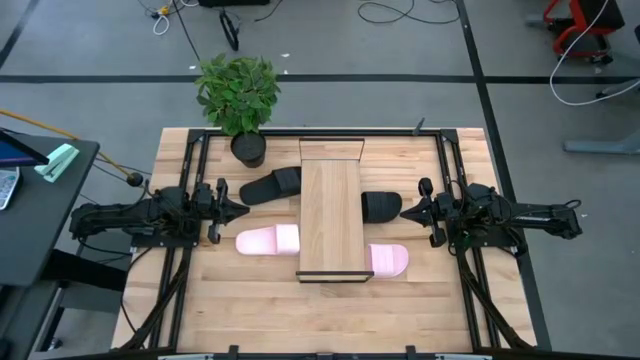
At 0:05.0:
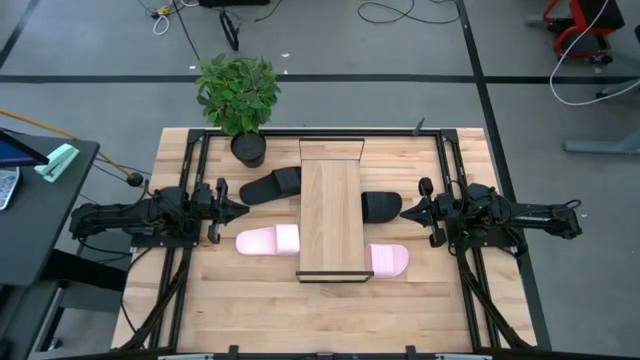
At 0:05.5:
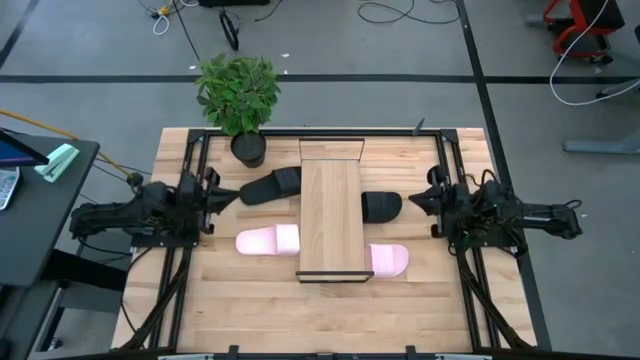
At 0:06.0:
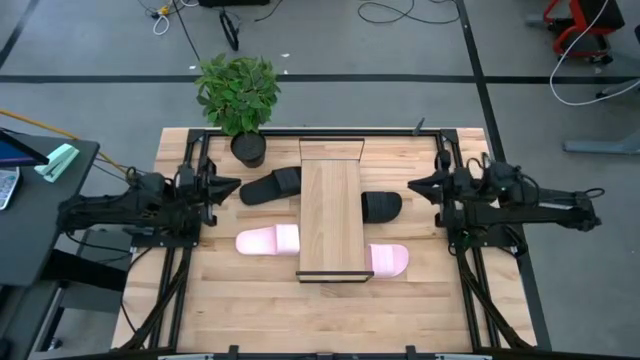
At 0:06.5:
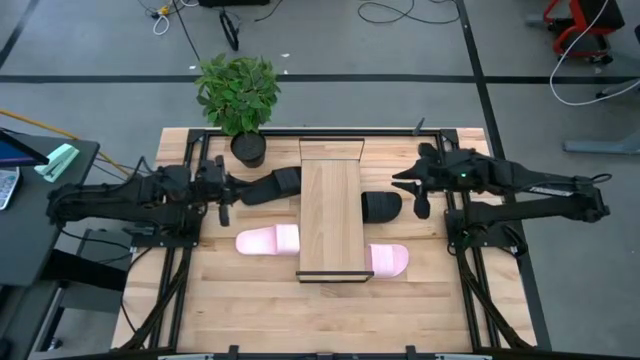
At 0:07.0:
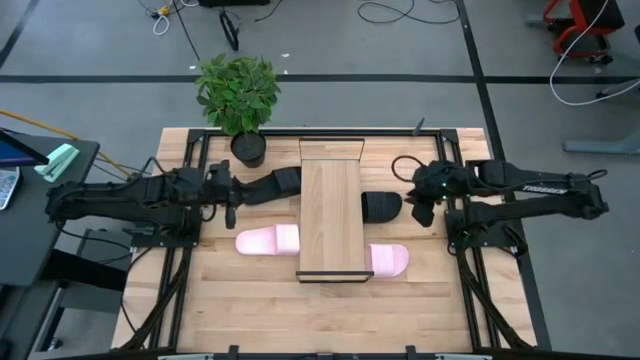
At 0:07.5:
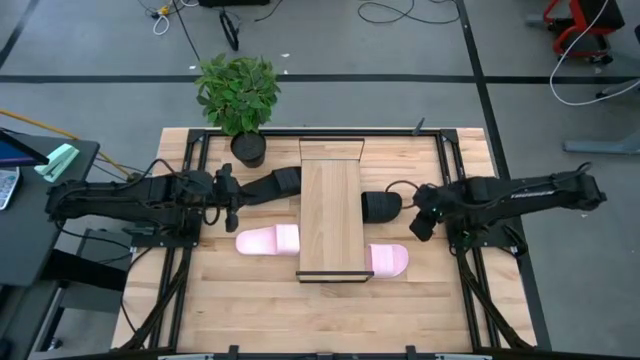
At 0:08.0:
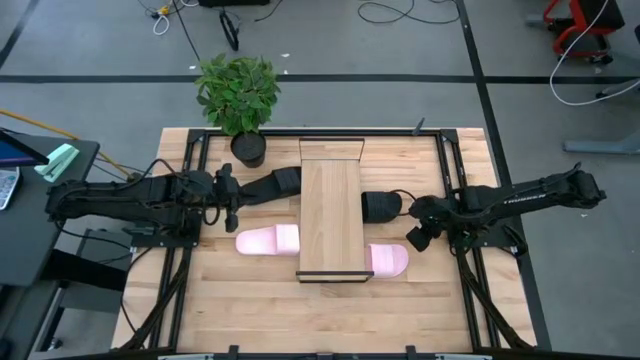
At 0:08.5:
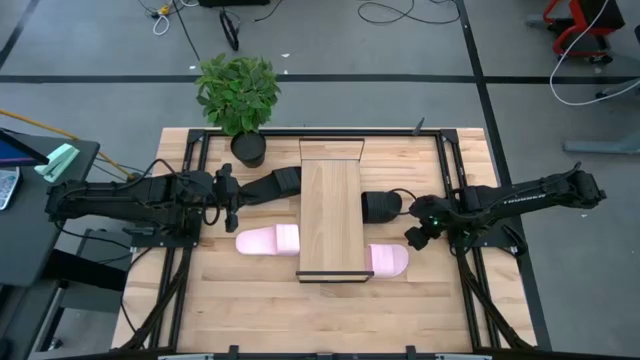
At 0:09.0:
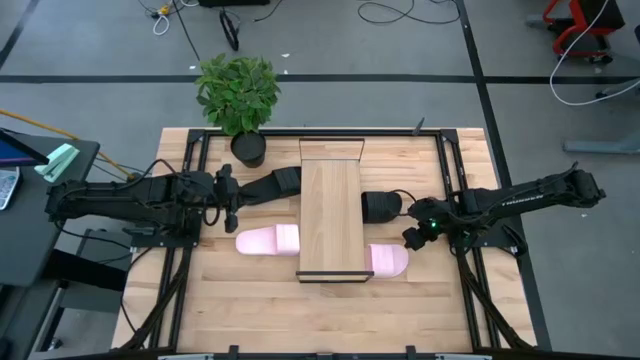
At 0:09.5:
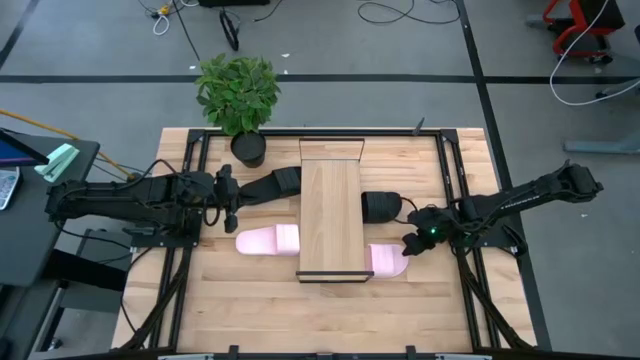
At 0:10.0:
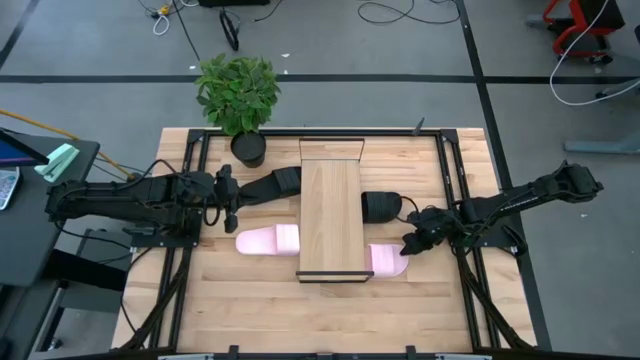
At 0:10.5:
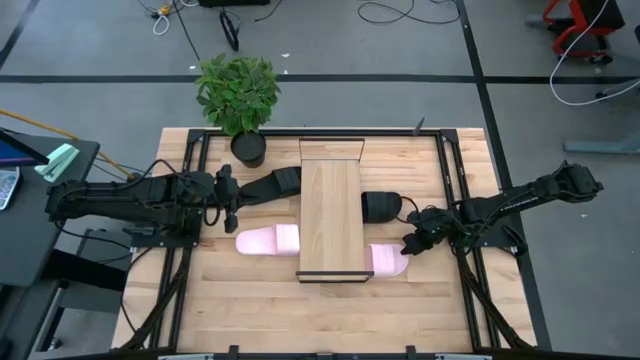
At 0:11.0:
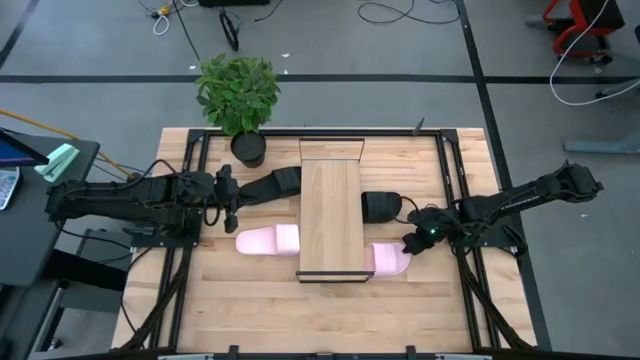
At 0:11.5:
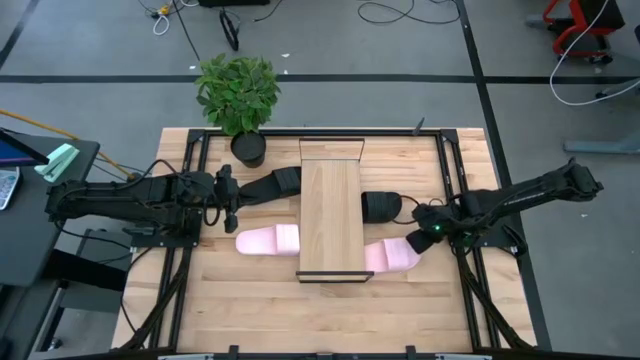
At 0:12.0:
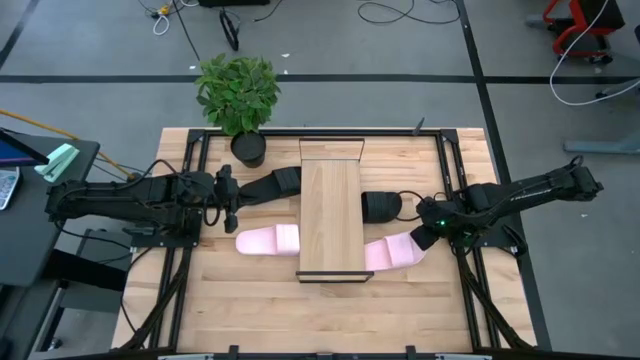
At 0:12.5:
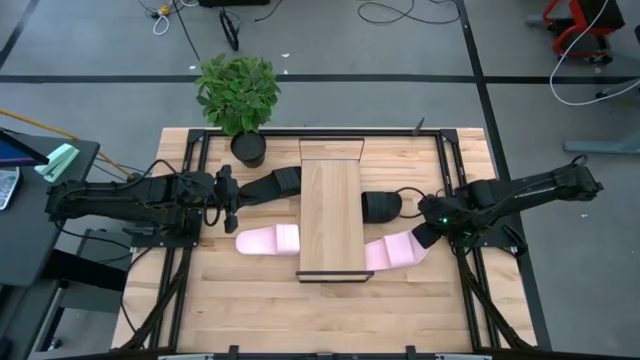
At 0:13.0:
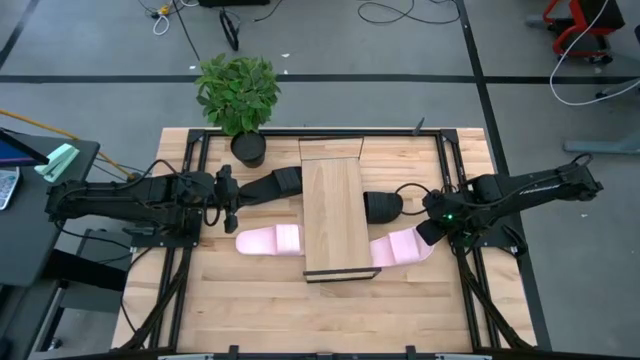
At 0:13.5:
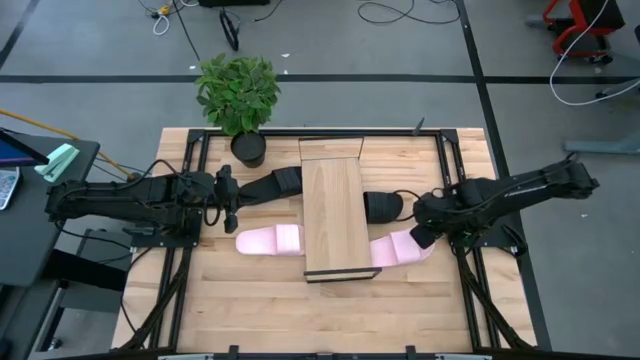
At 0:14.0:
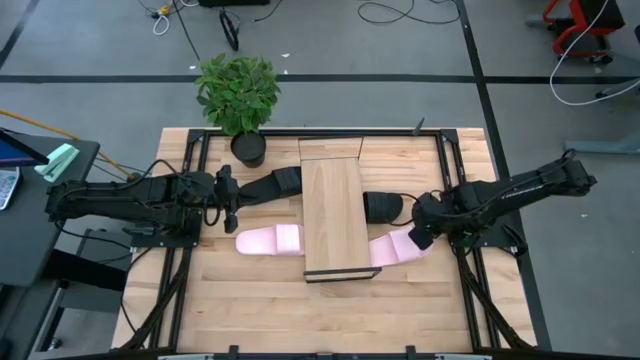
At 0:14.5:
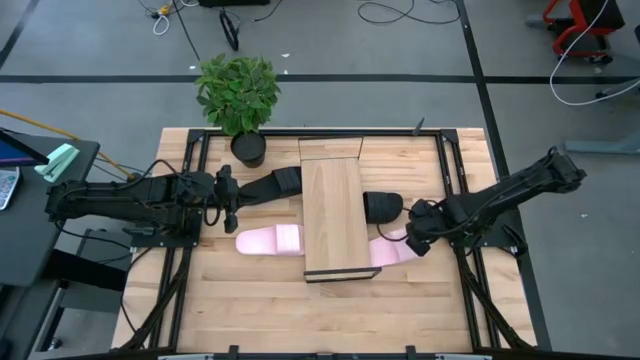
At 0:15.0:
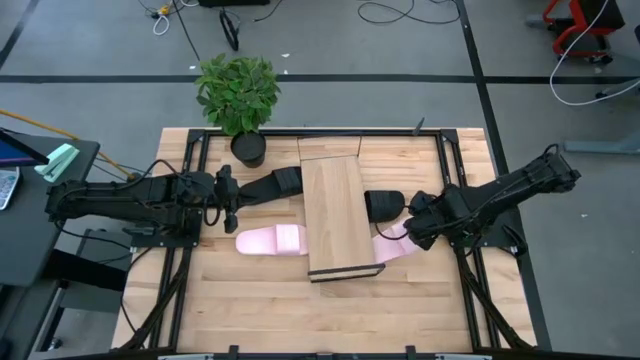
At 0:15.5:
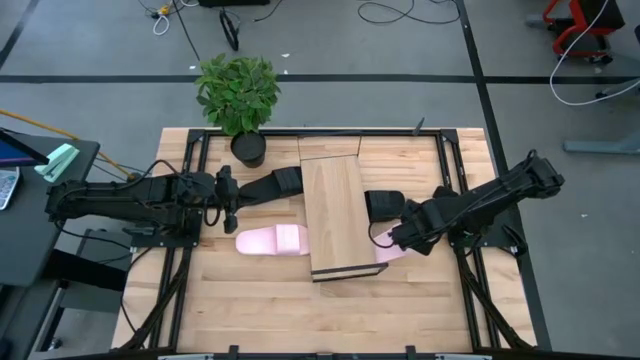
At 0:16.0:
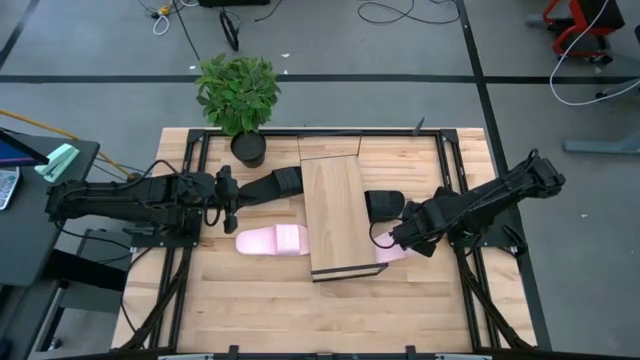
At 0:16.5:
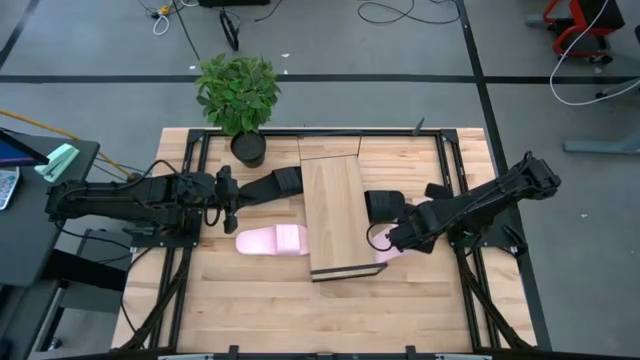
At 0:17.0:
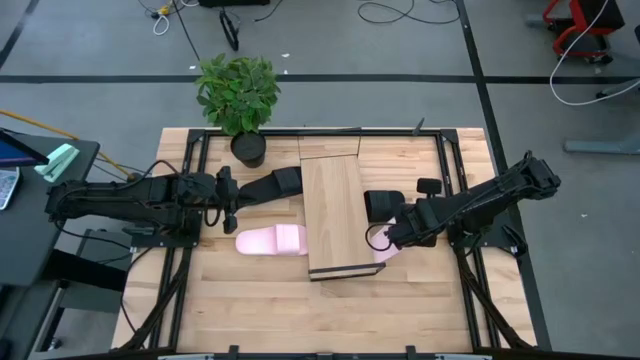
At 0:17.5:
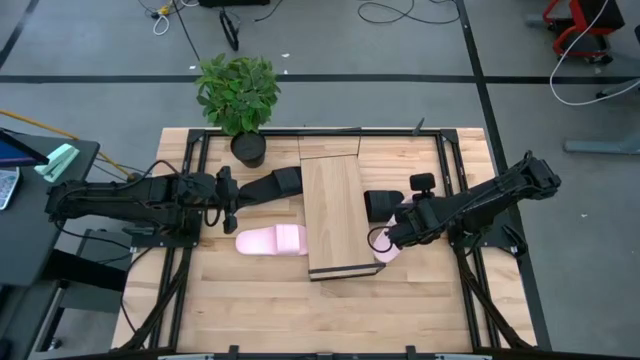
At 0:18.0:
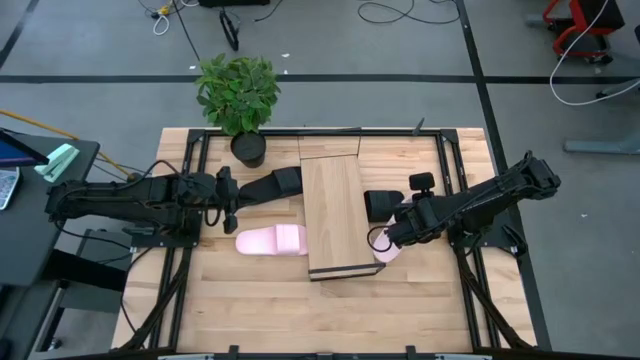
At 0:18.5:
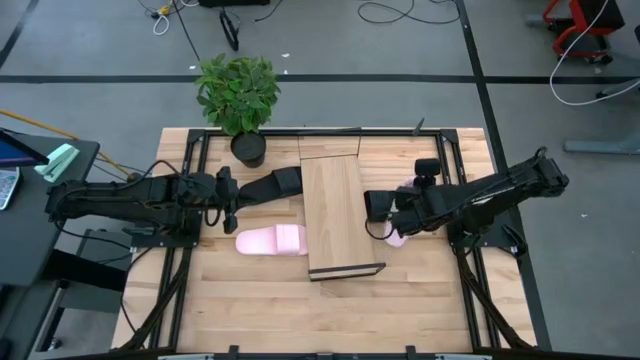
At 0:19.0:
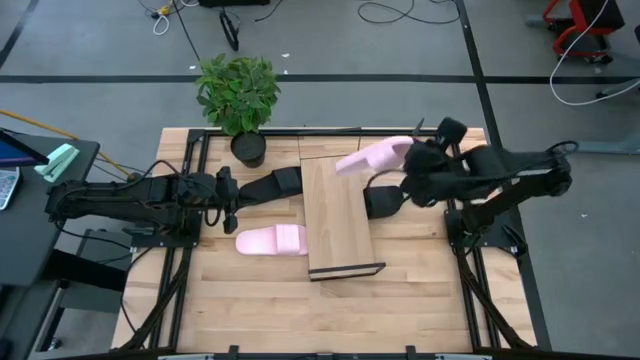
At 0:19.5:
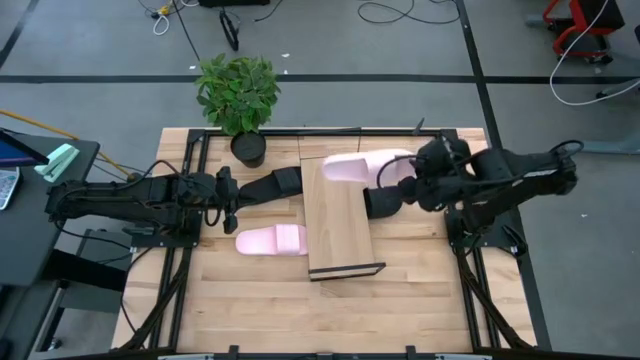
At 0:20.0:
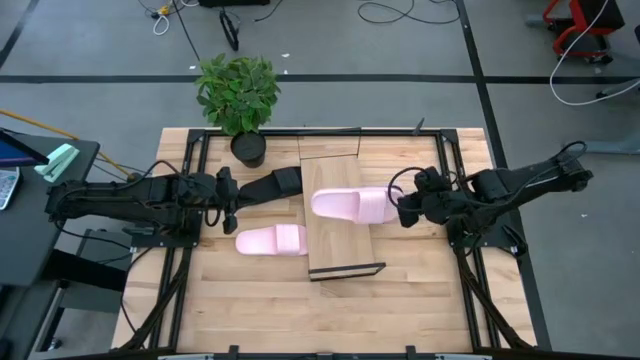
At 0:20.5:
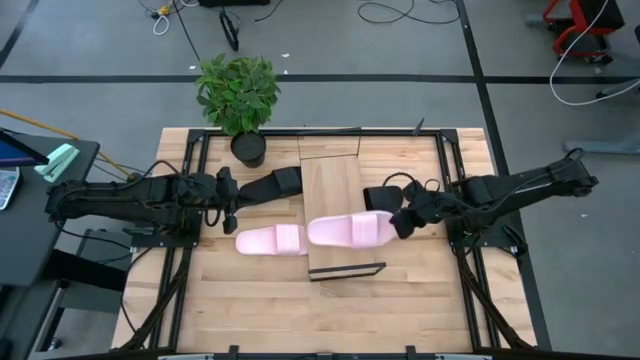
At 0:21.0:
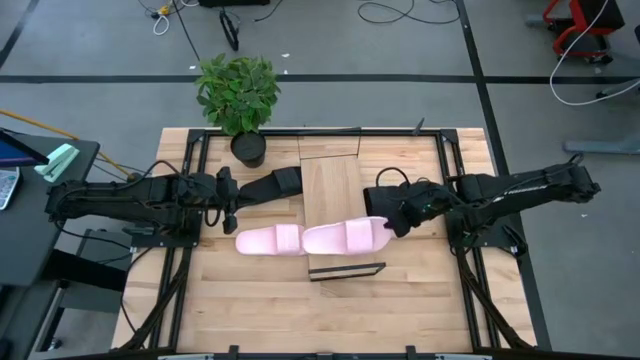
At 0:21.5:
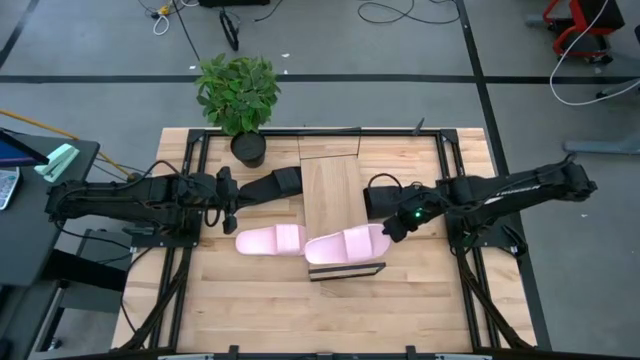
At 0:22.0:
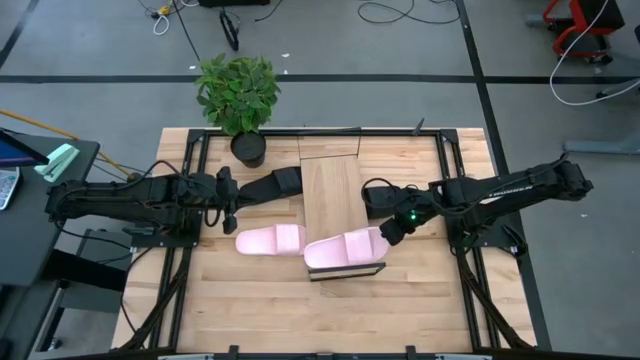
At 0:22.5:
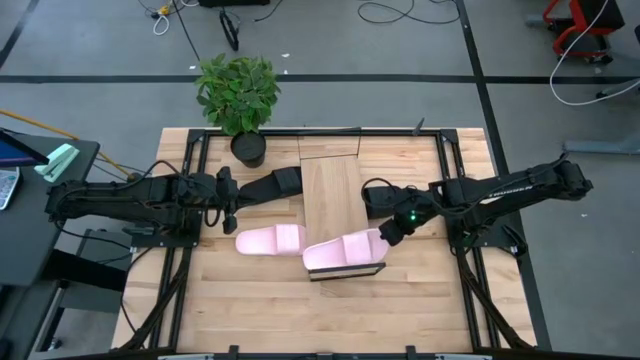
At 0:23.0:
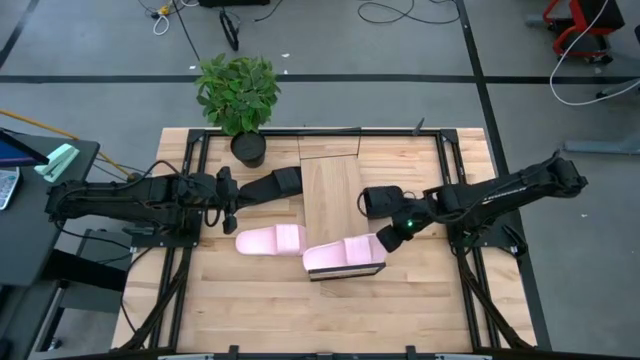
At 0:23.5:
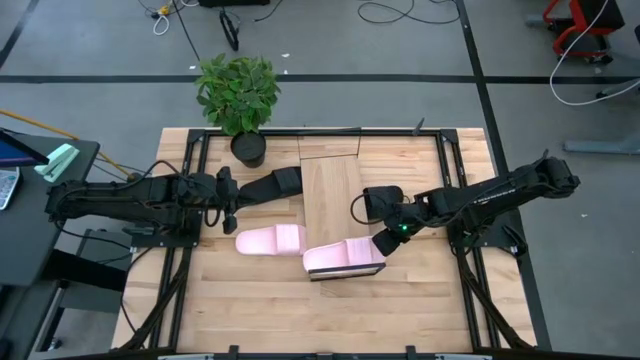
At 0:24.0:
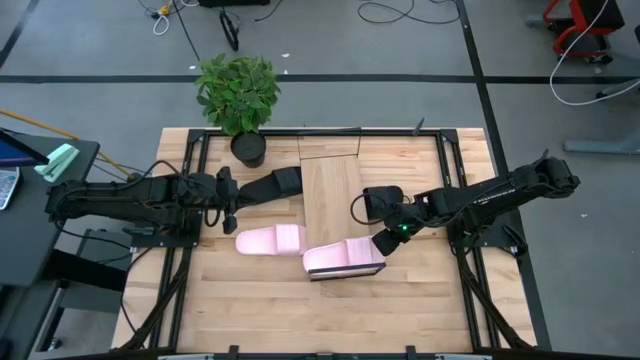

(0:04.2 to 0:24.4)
Task: Pick and place slides into the shelf
Put the right pink slide on the shelf
